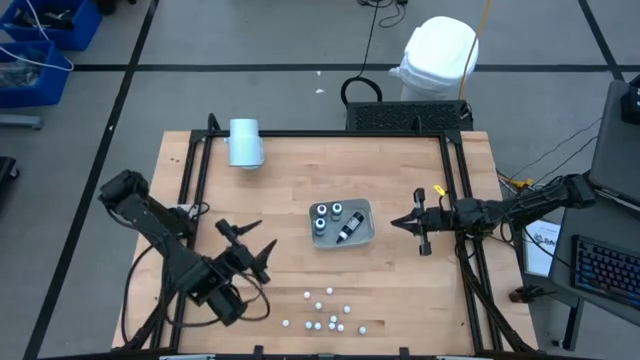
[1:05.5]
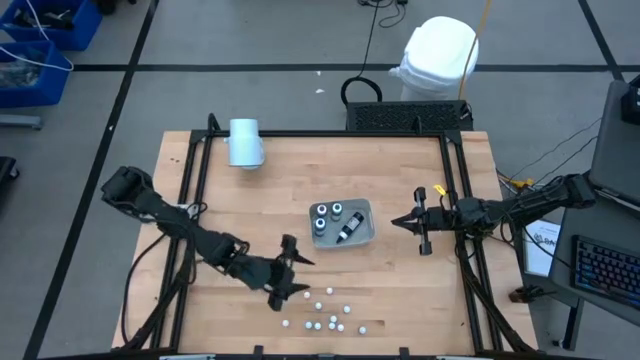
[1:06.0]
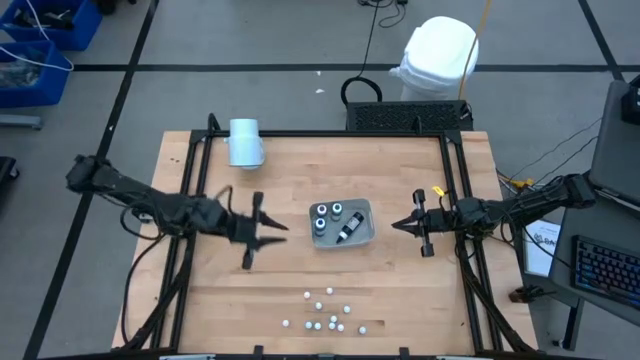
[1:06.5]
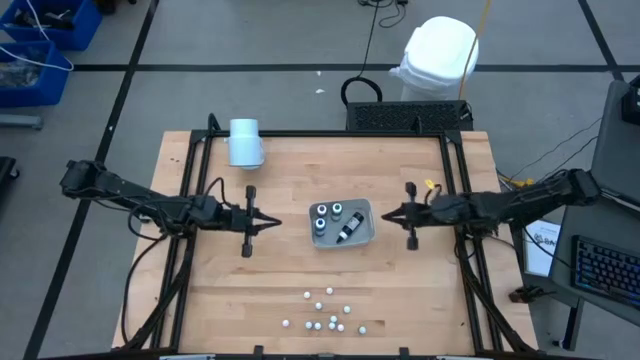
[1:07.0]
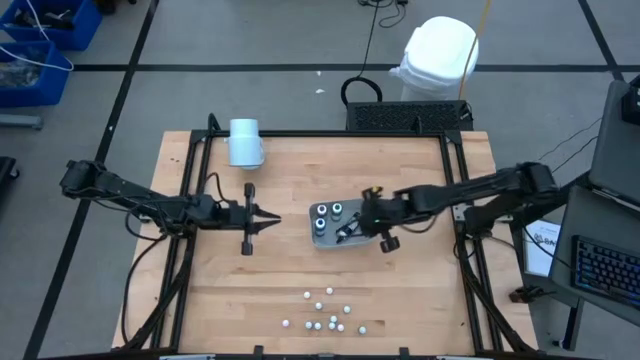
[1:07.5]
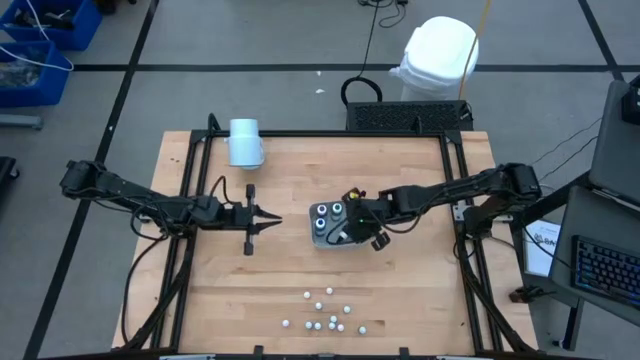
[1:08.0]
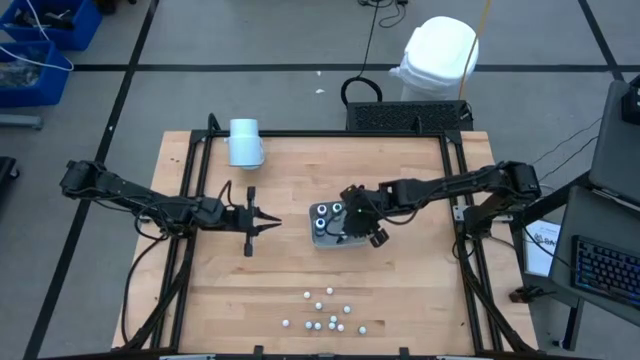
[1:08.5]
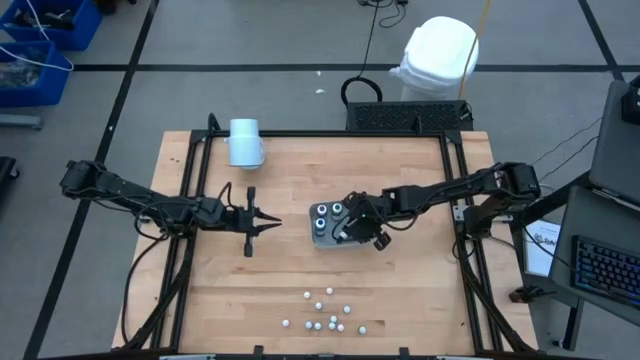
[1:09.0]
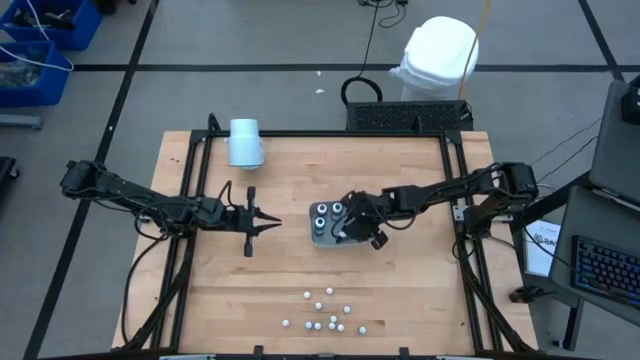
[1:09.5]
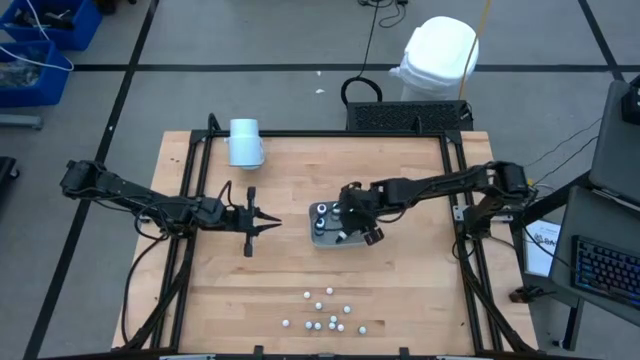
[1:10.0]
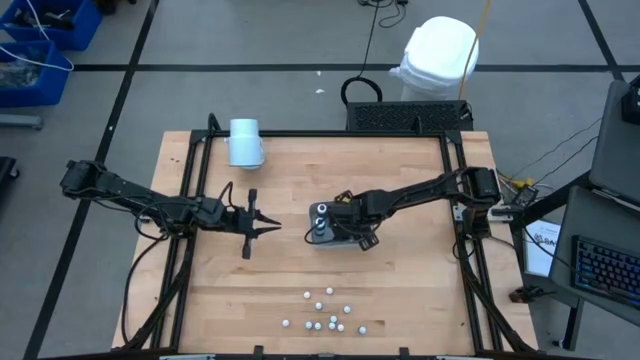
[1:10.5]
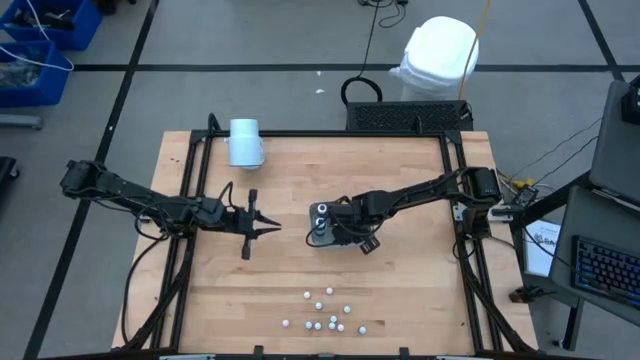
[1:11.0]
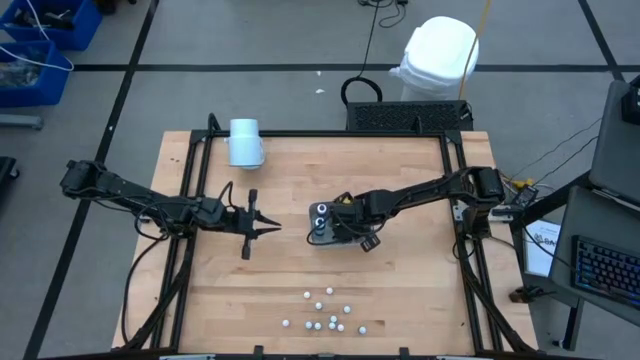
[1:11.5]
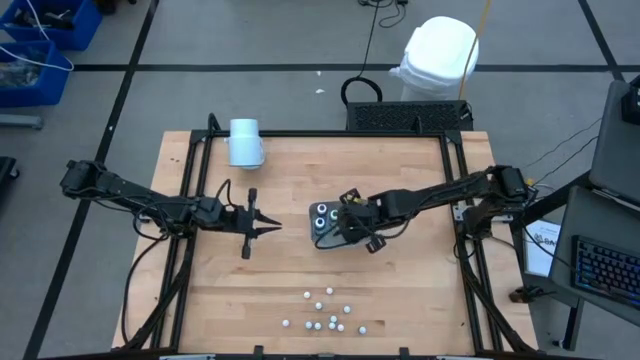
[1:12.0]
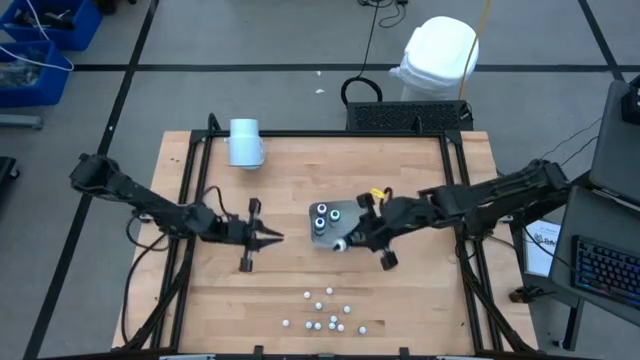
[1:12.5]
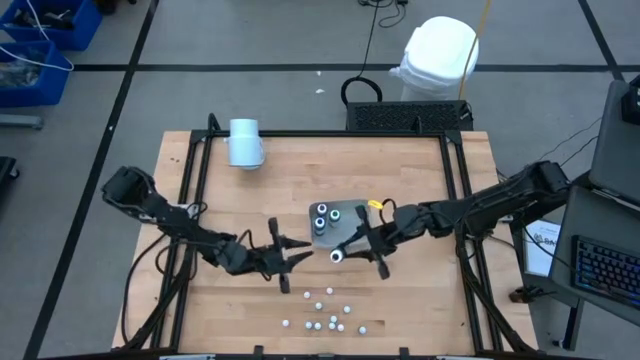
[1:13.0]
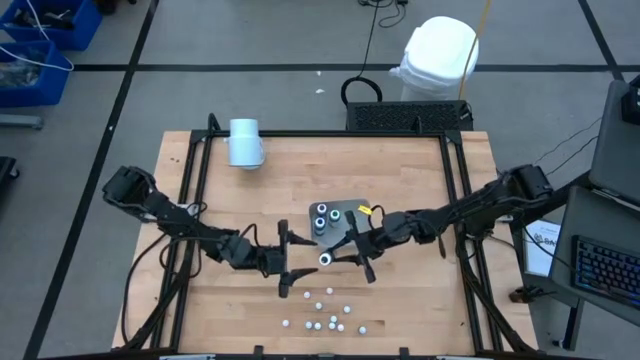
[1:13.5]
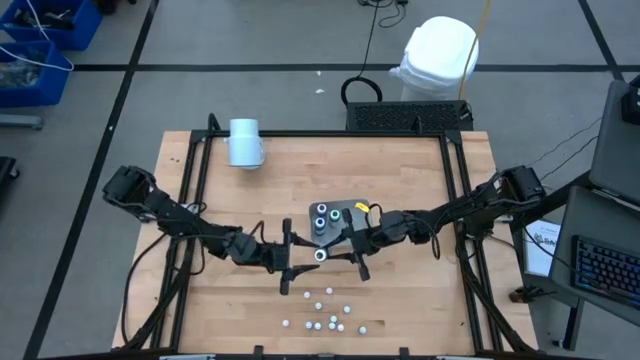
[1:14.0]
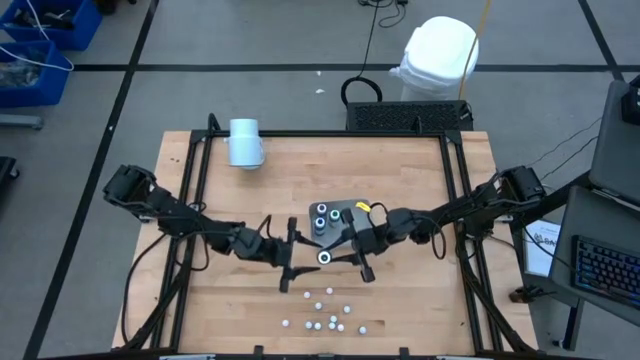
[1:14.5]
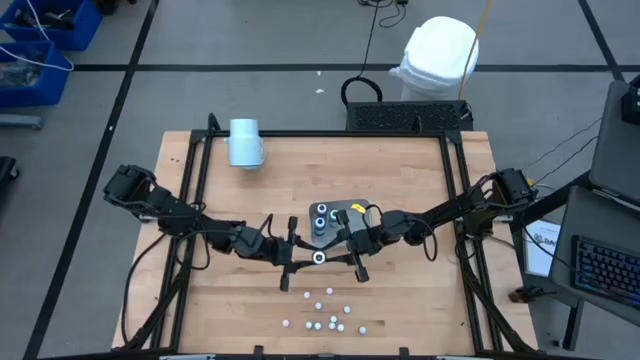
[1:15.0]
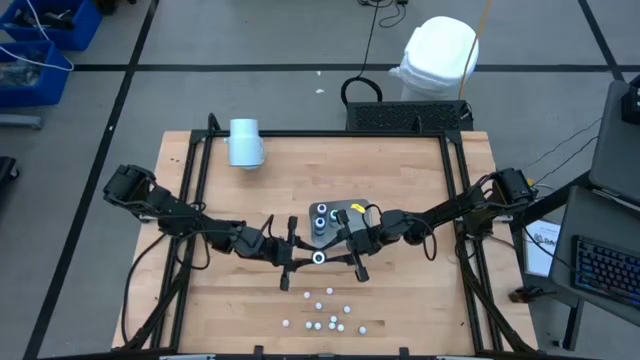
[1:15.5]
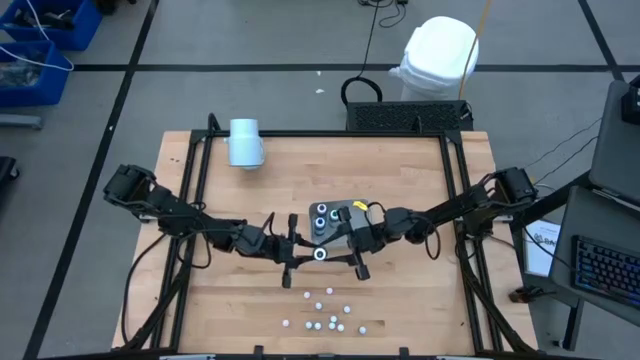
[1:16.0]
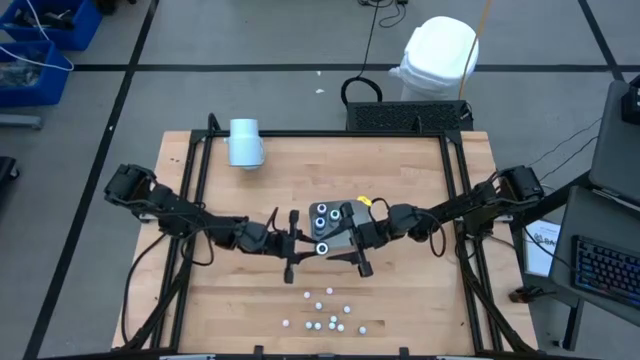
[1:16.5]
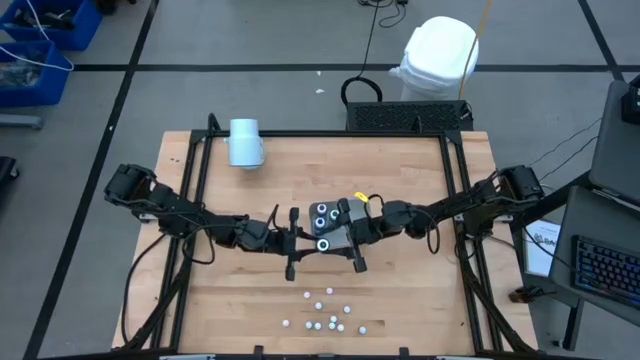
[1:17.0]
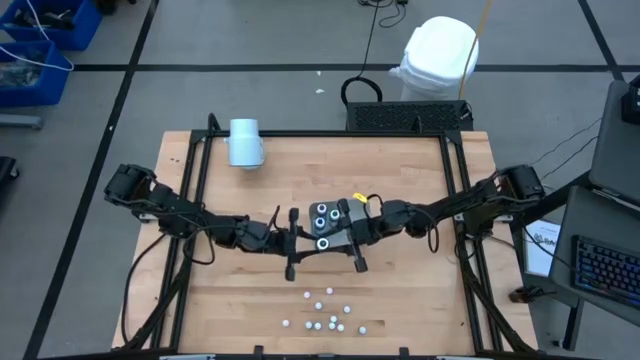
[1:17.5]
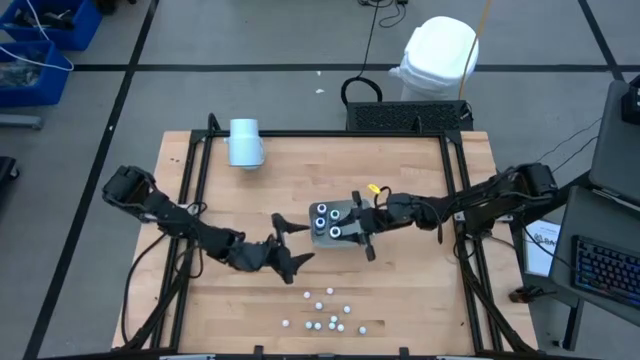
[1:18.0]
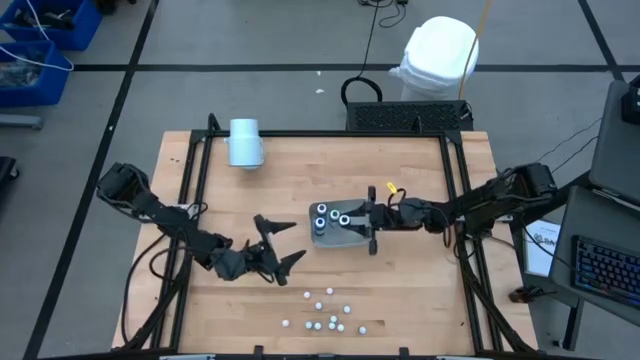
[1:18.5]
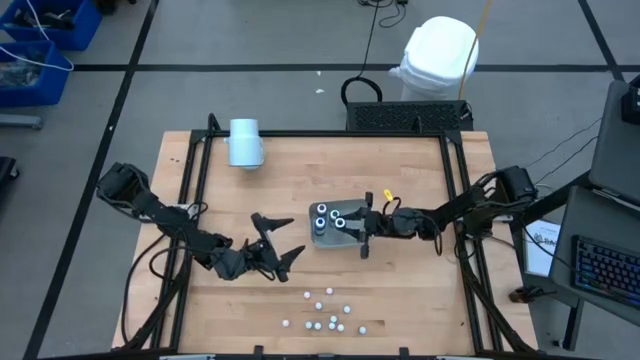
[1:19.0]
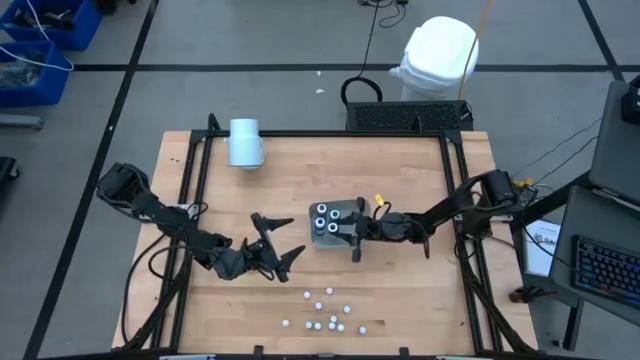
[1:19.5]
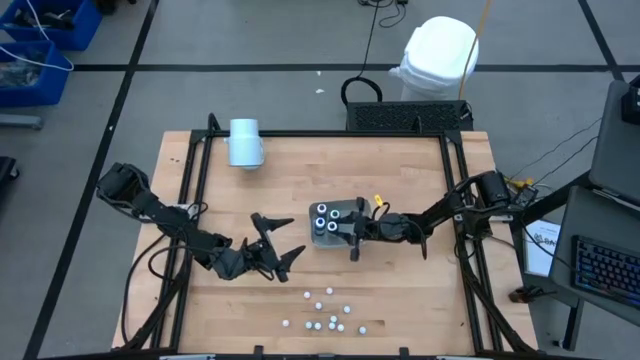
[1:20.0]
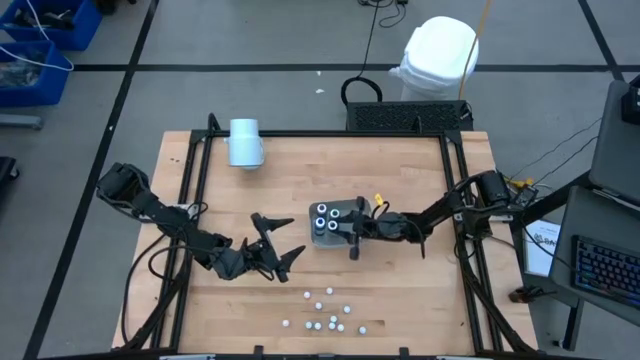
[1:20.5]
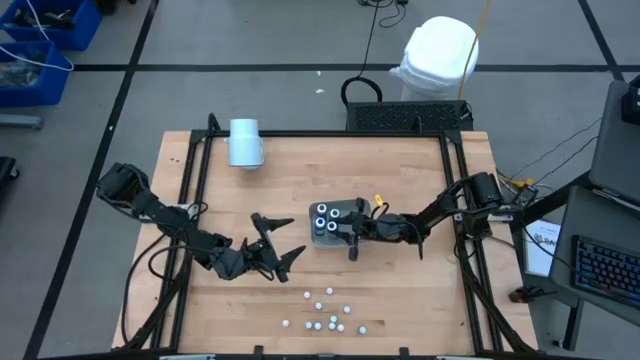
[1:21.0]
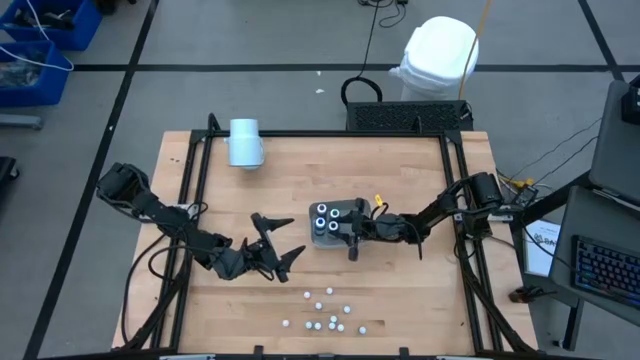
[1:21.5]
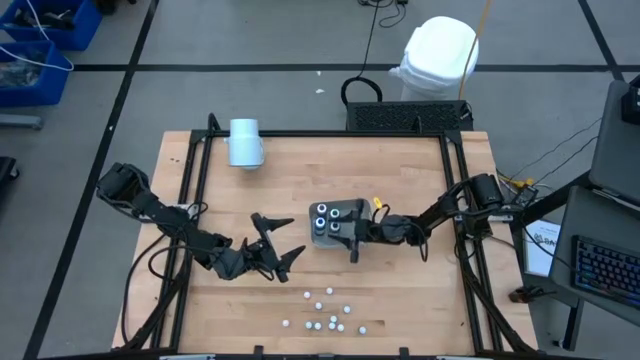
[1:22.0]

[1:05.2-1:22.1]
Task: Pick & Place food coloring
Put the large black food coloring bottle into the gray bin

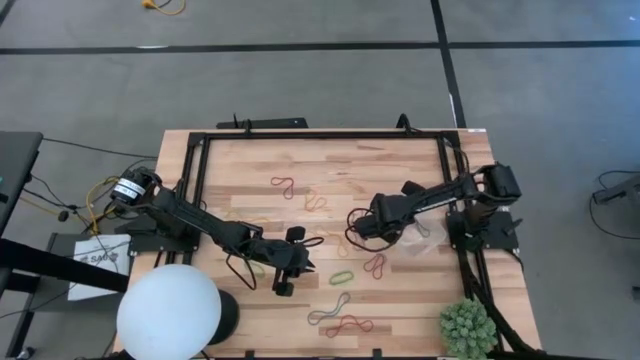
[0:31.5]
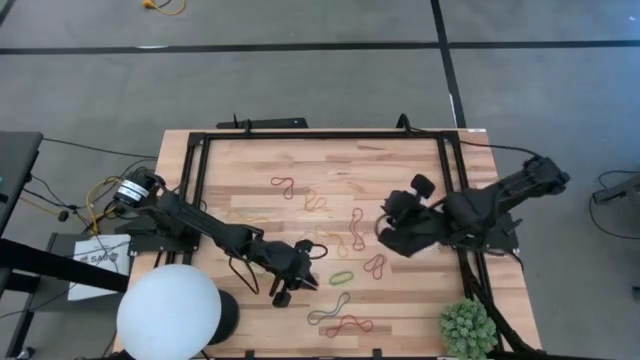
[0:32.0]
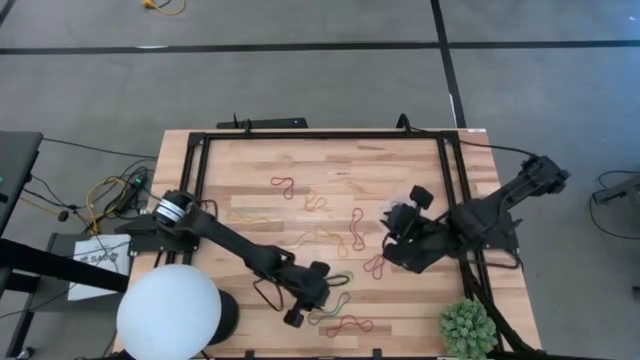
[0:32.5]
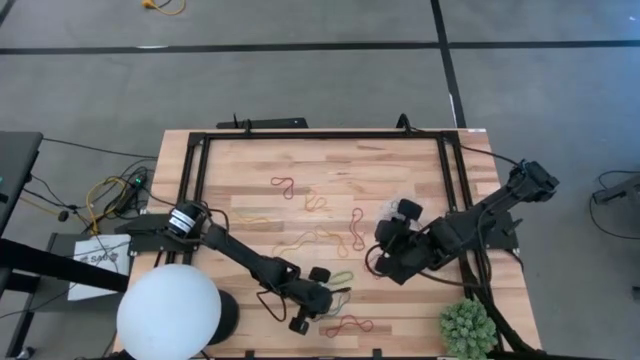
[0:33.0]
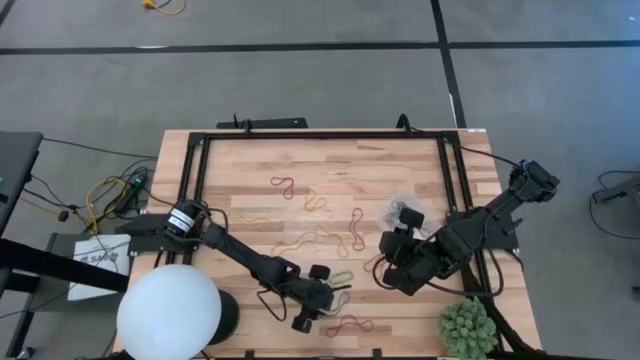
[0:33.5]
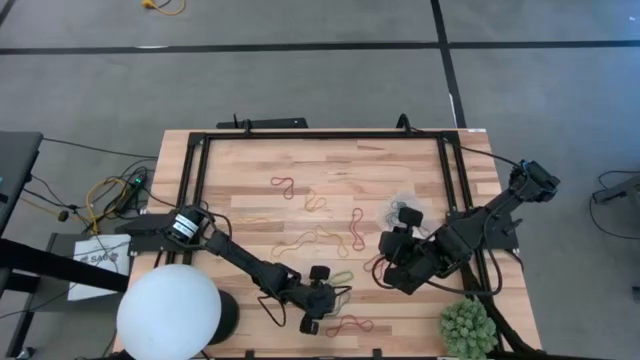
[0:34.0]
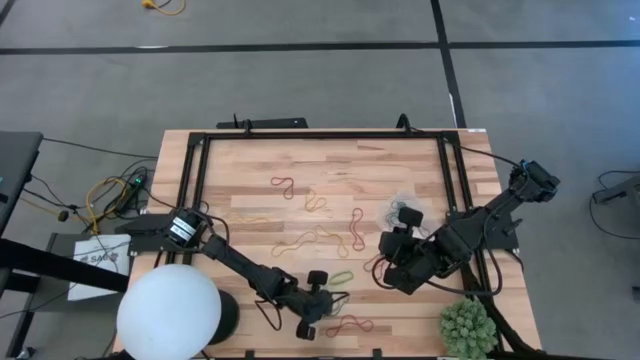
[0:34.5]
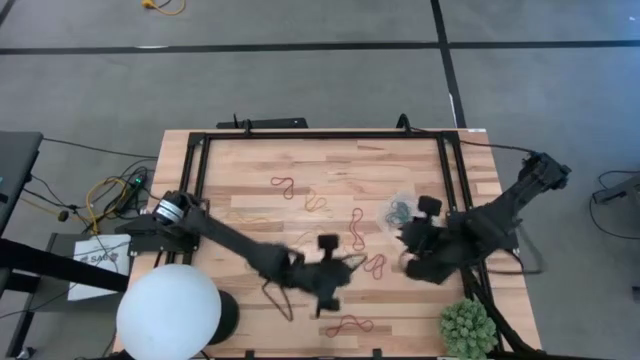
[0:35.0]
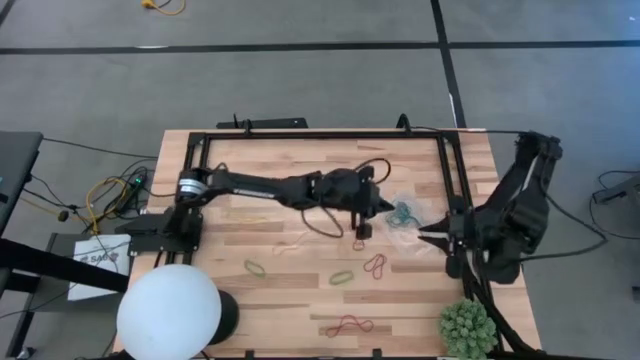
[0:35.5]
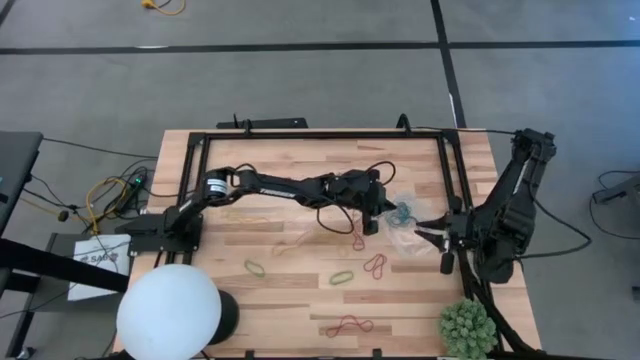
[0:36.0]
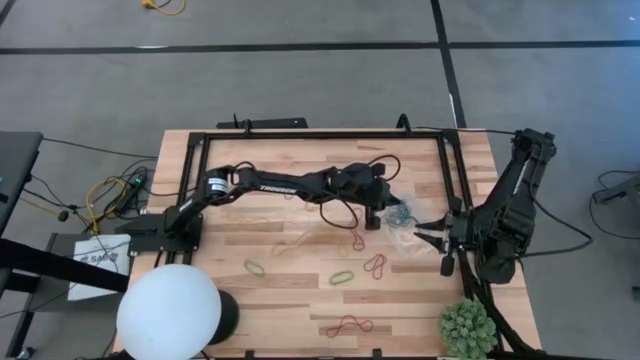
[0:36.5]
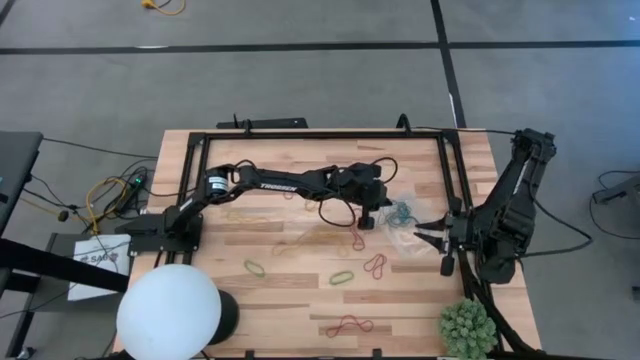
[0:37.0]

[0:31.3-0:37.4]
Task: Pick and place items into bin
Put the blue rubber band into the transparent bin
